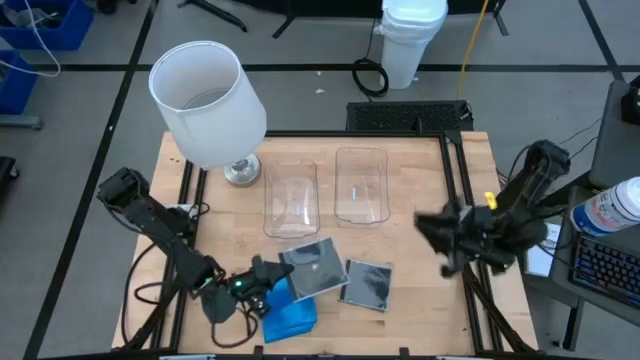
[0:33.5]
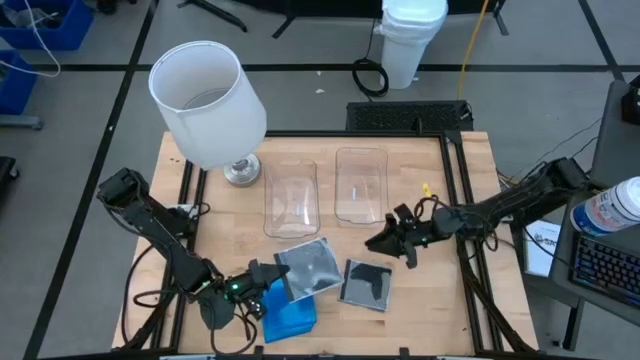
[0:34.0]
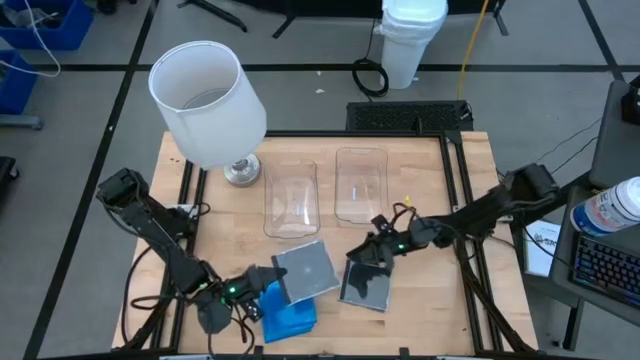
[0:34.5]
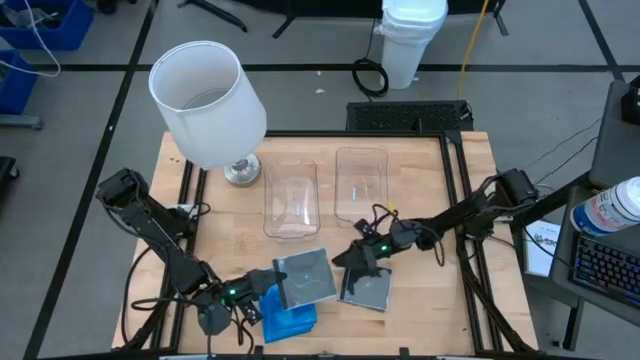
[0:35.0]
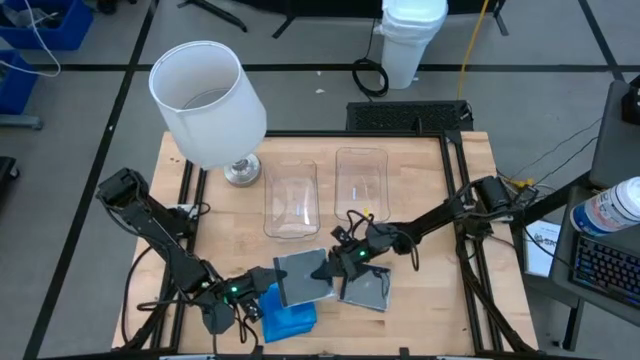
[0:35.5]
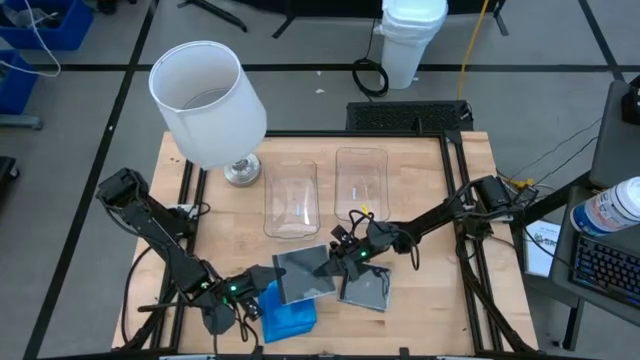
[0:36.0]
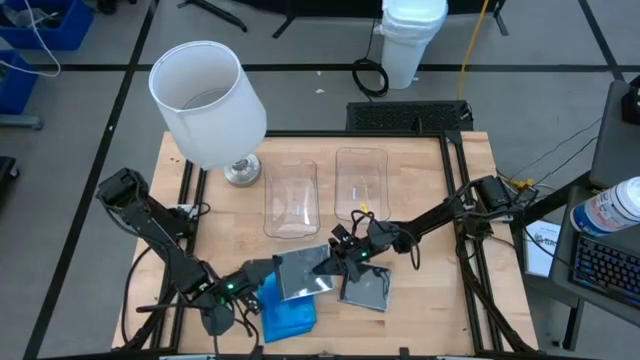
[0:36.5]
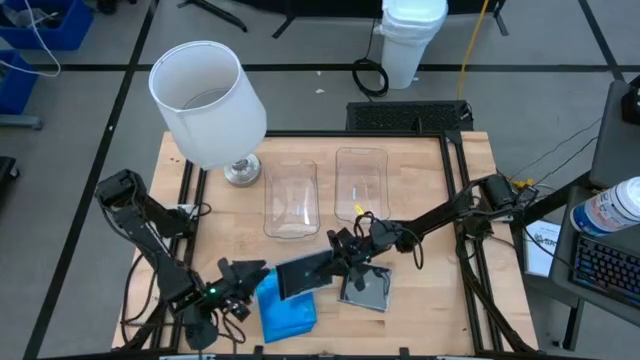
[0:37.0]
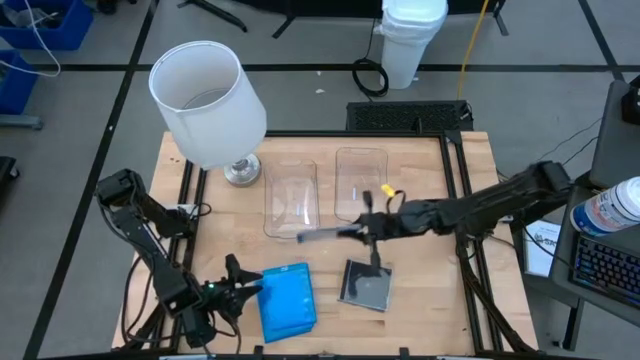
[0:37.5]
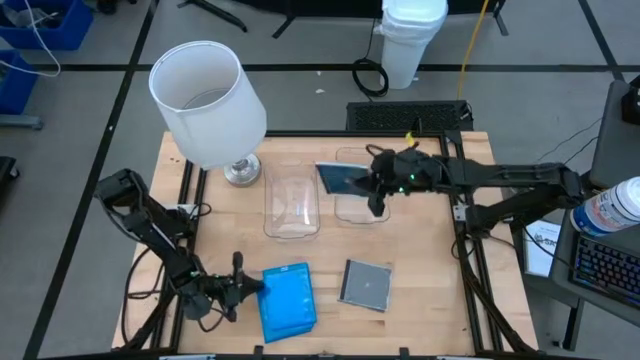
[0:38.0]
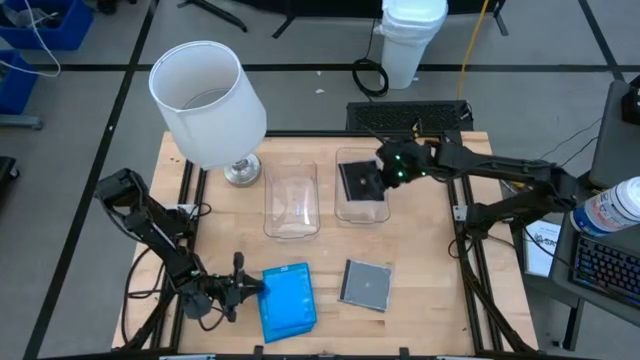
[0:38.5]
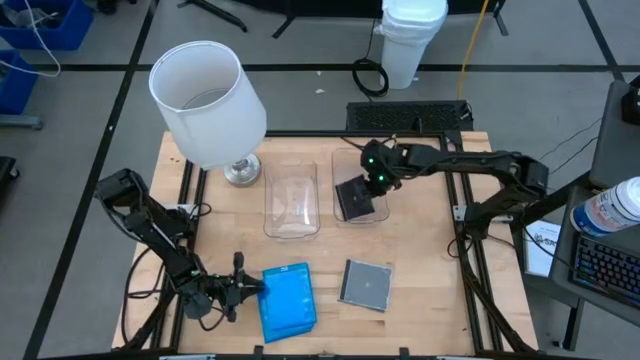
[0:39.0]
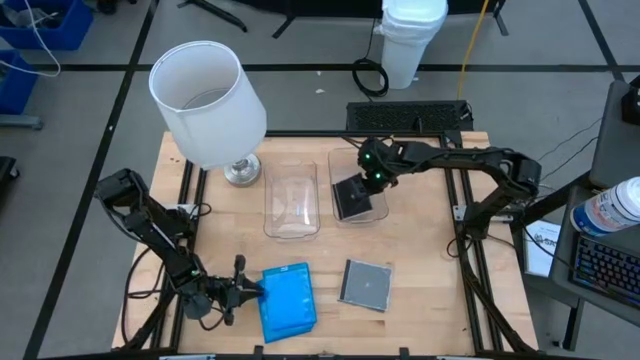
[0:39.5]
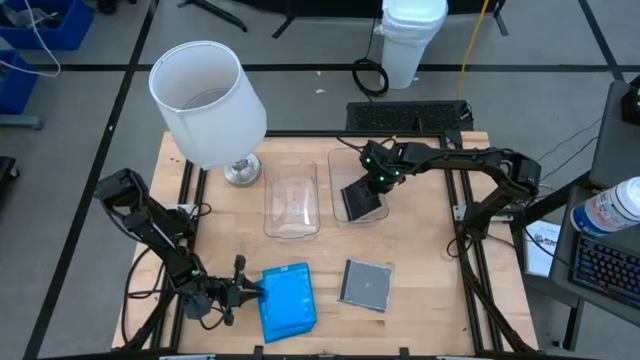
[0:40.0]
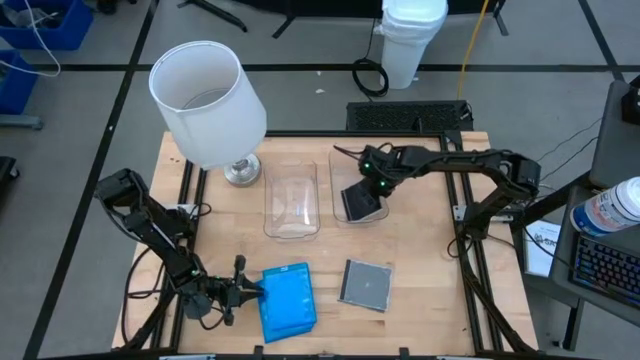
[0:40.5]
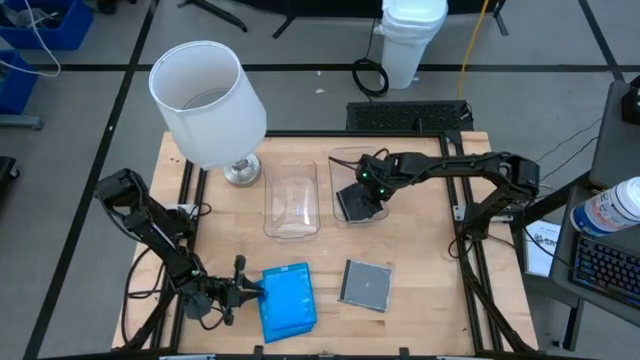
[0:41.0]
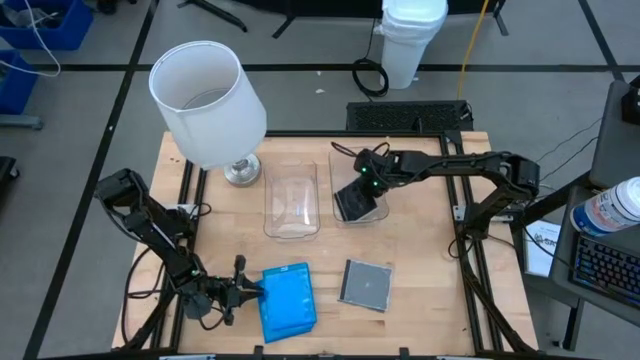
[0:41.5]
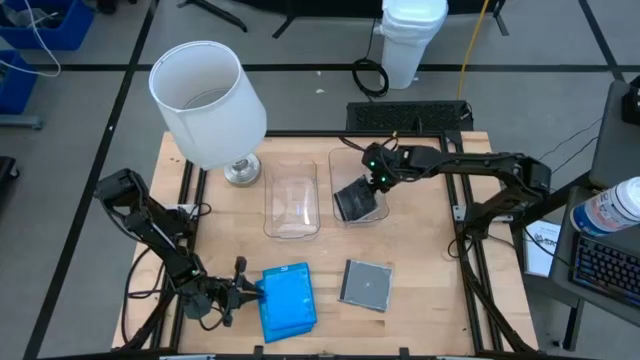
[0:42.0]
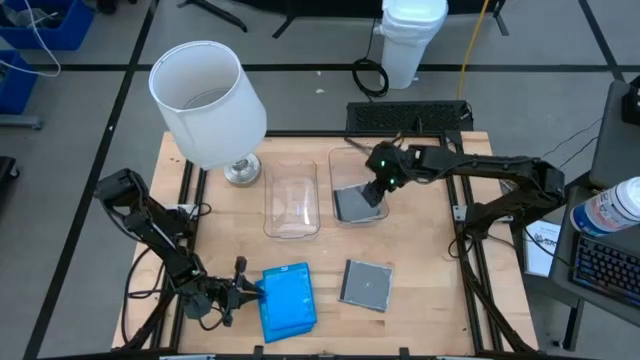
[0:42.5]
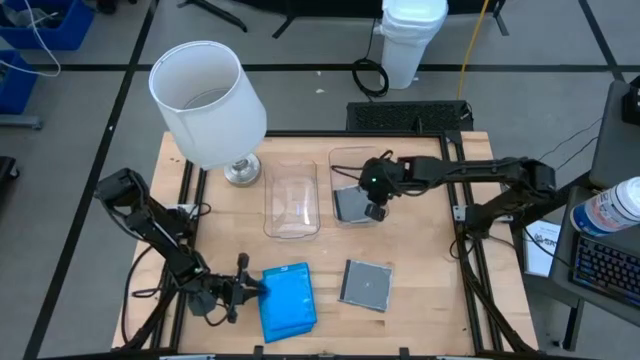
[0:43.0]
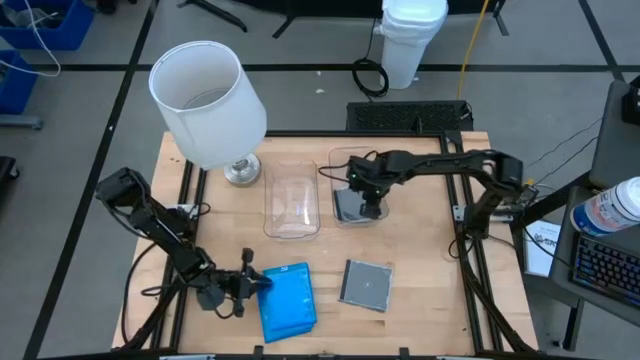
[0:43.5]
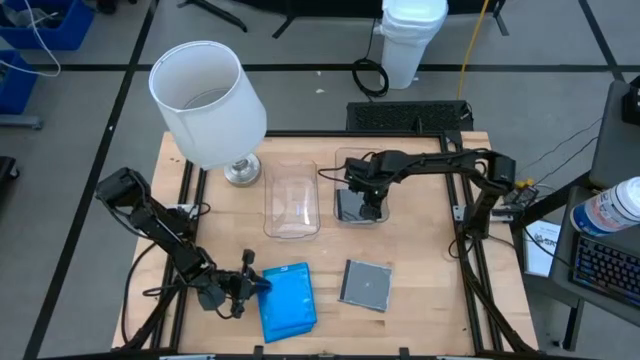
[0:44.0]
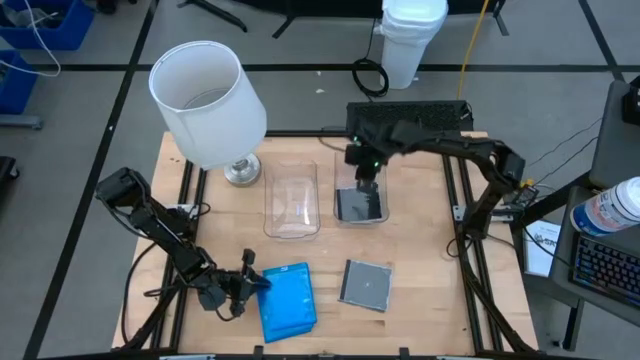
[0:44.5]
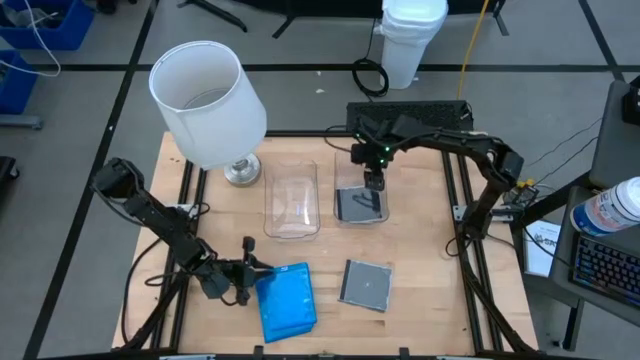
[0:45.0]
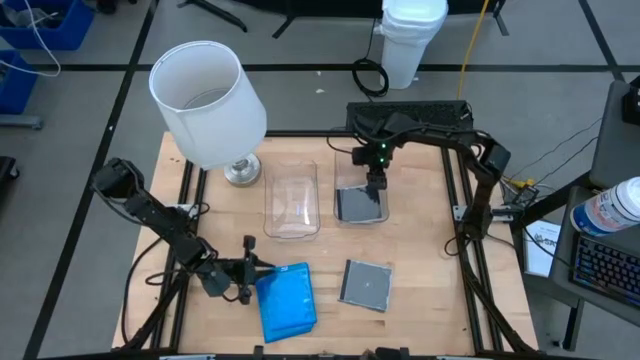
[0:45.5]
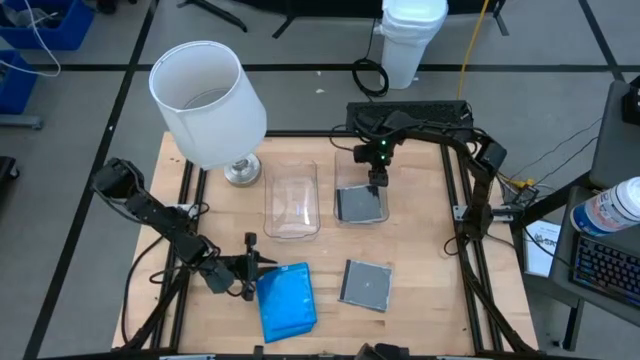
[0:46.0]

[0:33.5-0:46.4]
Task: Pick & place jewel cases by type
Put the black CD case into the right transparent bin

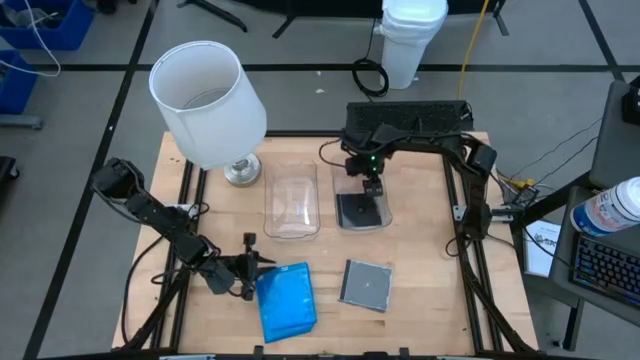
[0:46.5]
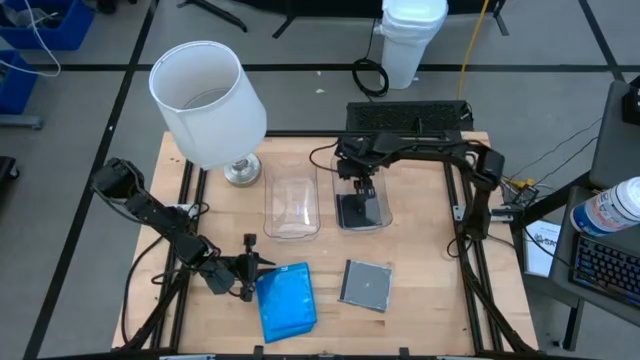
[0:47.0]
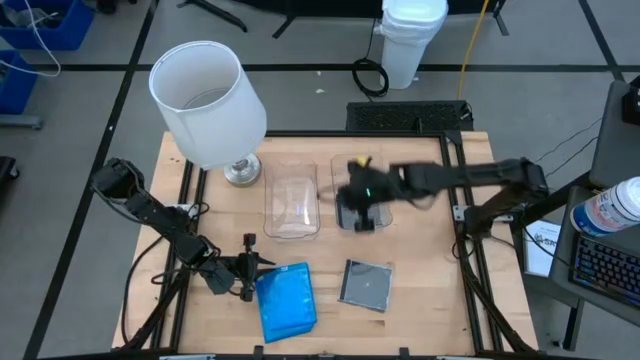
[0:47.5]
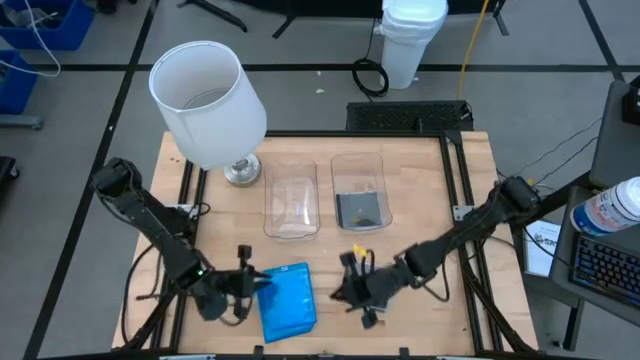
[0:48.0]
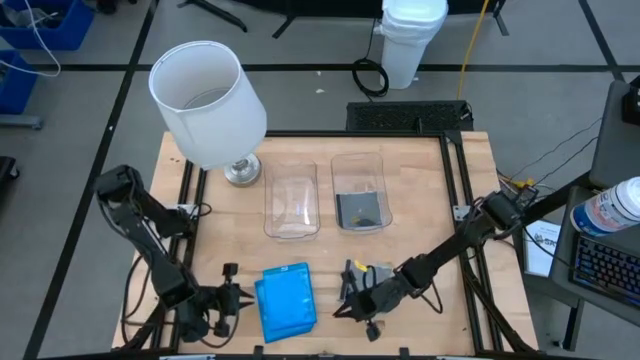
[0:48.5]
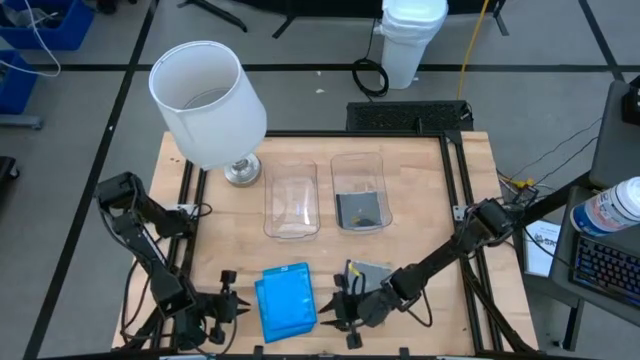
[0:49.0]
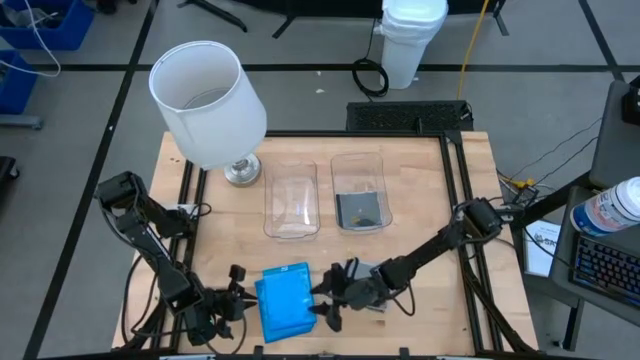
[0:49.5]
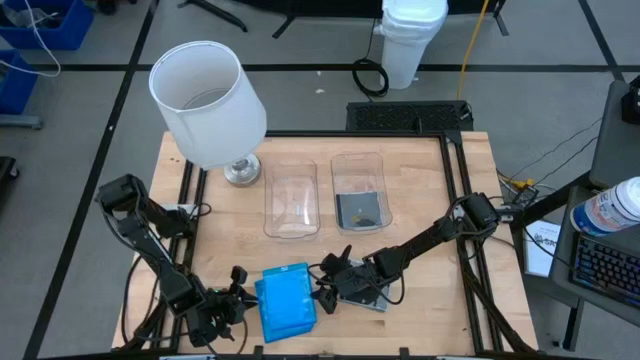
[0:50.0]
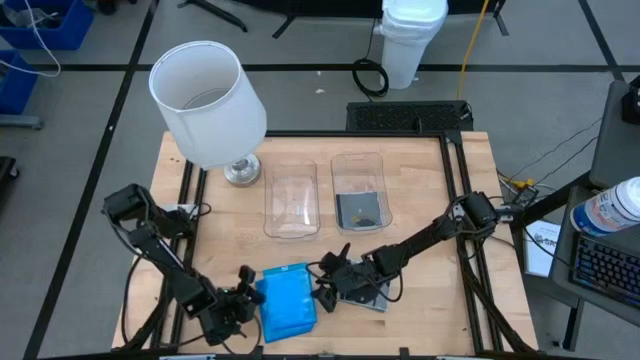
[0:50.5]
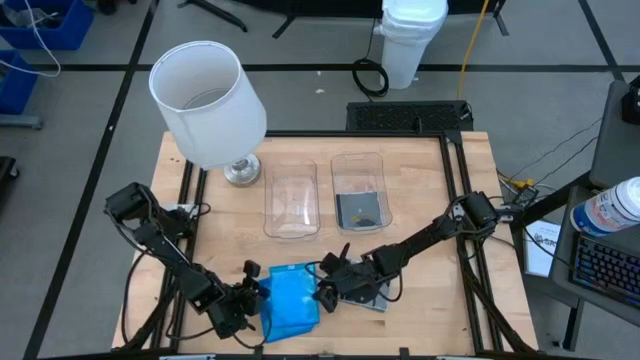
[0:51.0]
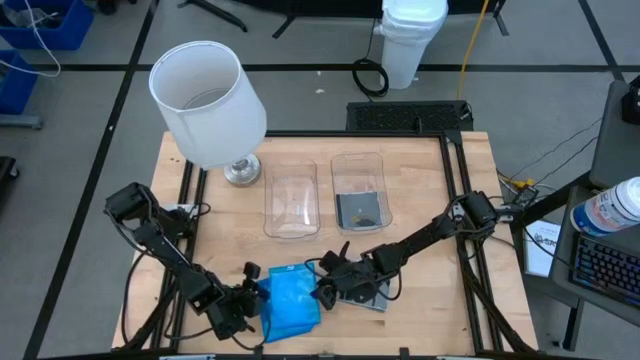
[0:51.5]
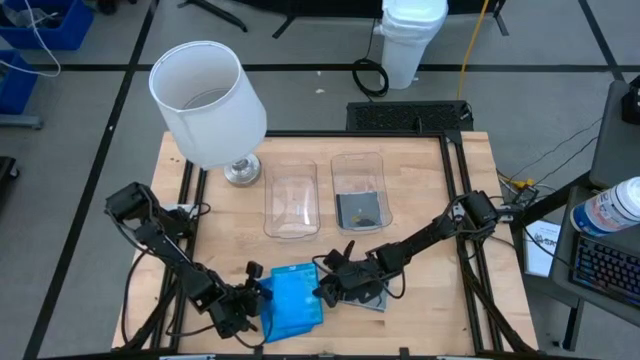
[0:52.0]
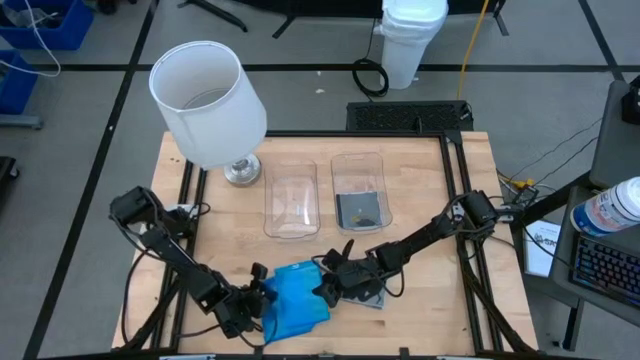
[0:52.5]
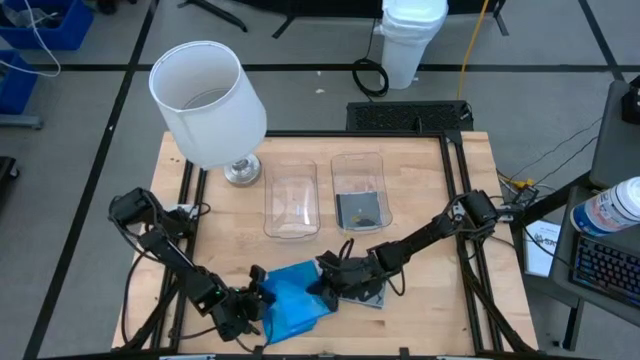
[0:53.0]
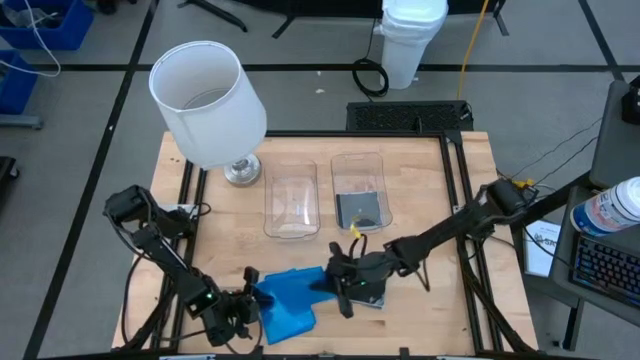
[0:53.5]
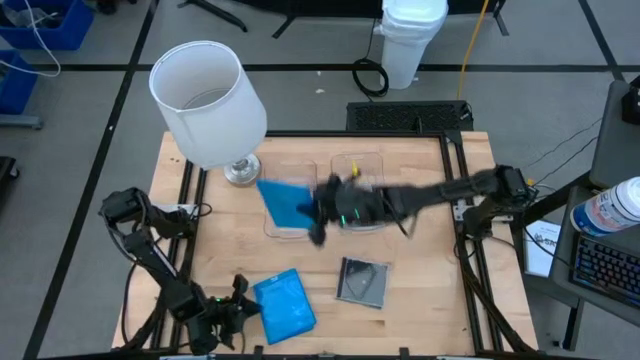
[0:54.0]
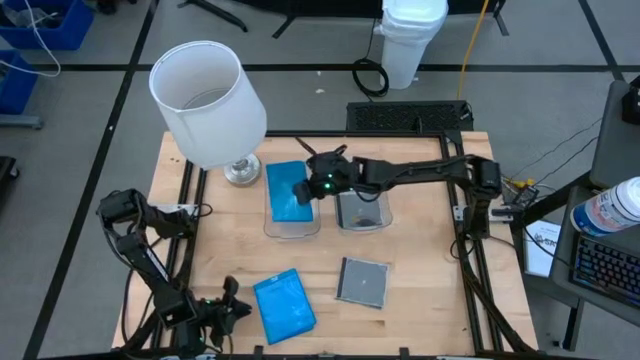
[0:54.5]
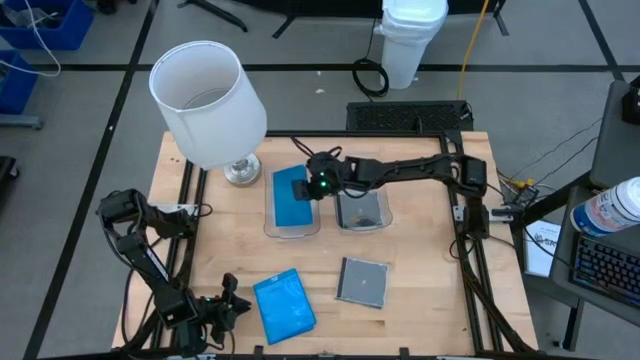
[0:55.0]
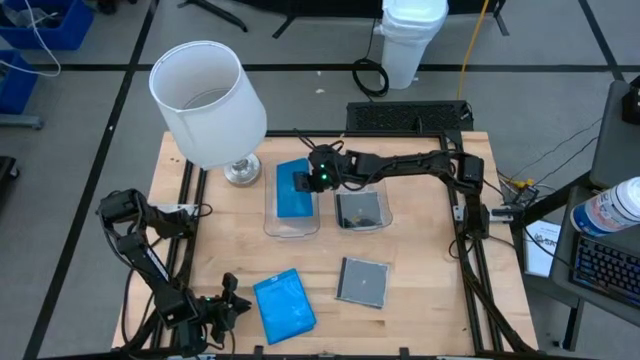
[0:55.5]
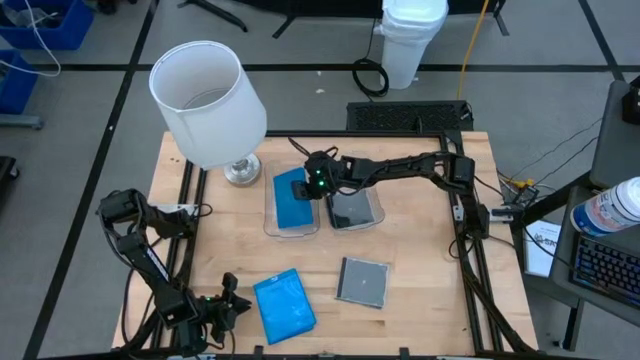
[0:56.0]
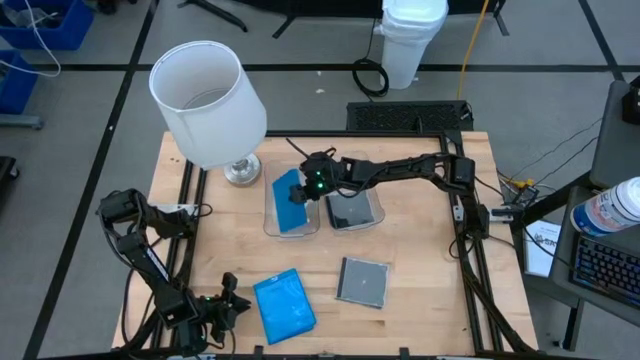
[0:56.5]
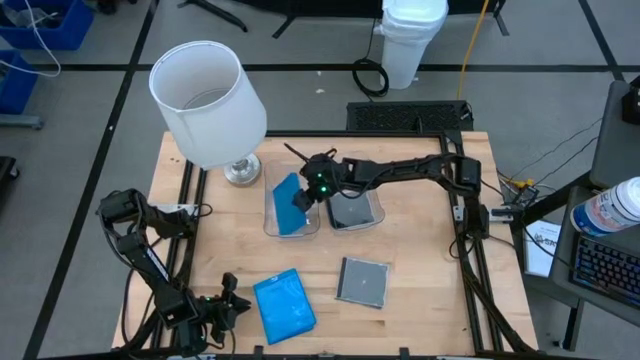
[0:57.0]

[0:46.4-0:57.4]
Put the blue CD case into the left transparent bin
